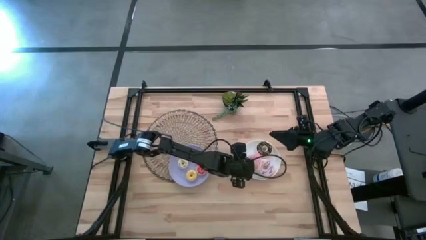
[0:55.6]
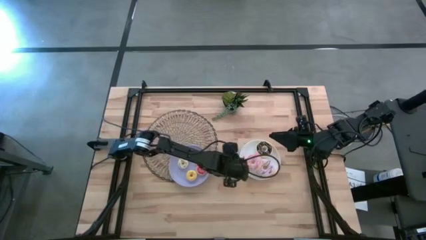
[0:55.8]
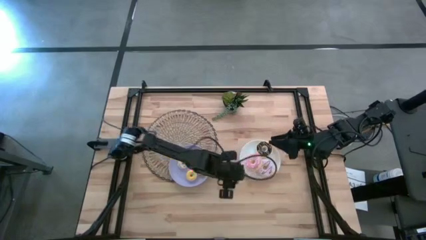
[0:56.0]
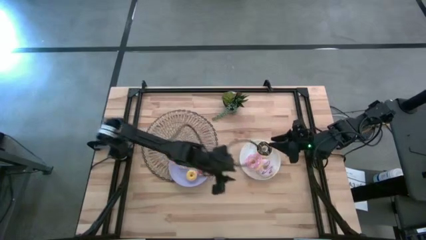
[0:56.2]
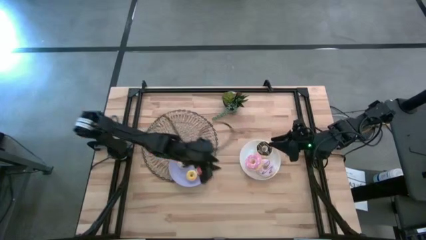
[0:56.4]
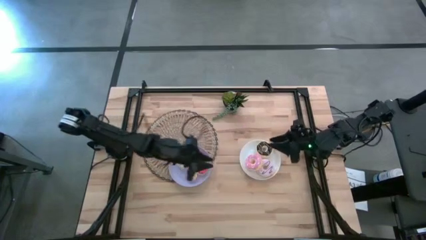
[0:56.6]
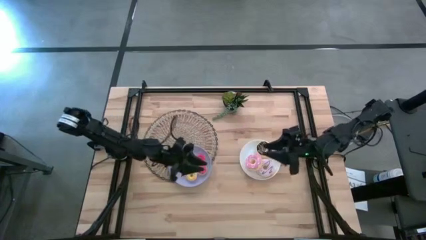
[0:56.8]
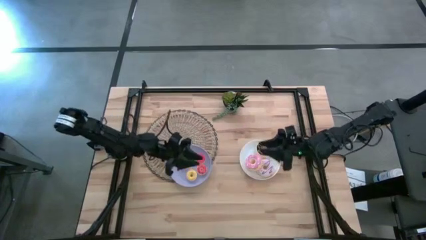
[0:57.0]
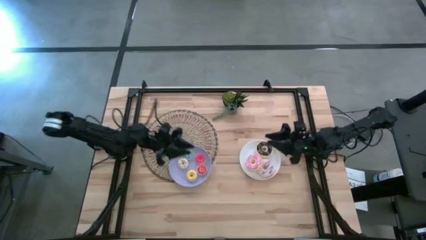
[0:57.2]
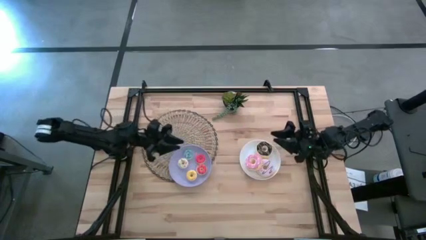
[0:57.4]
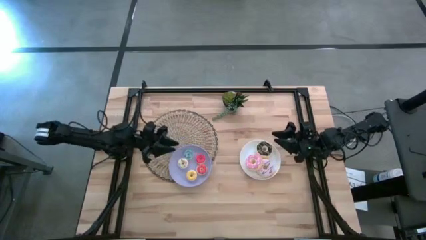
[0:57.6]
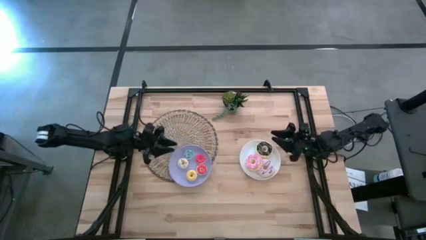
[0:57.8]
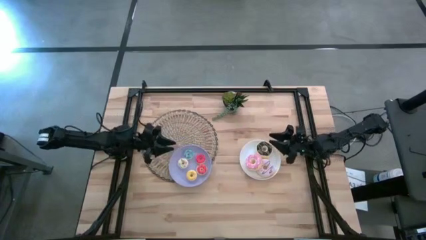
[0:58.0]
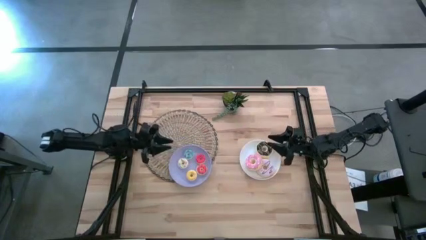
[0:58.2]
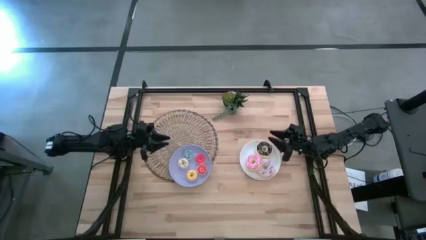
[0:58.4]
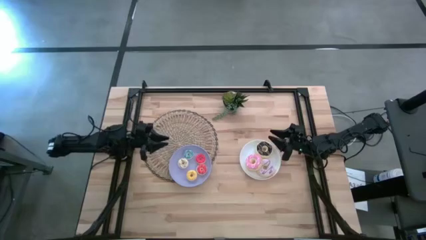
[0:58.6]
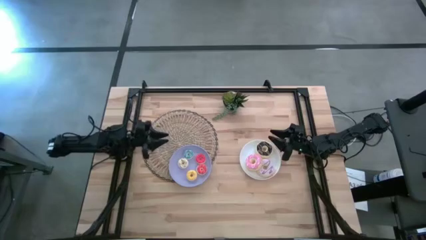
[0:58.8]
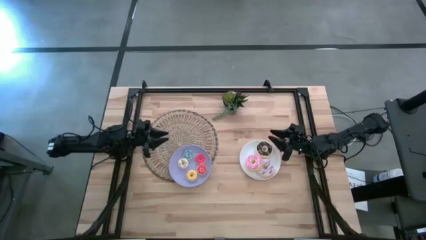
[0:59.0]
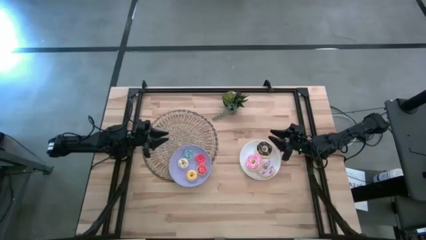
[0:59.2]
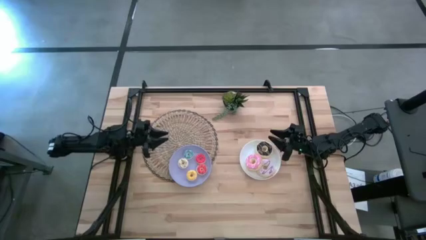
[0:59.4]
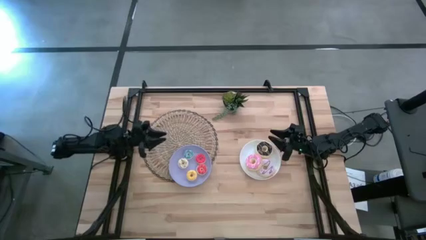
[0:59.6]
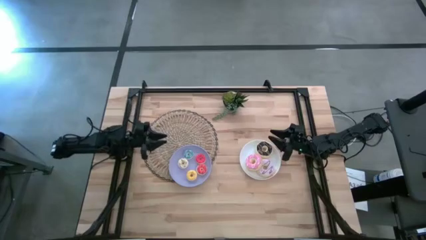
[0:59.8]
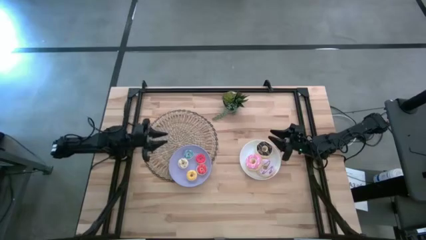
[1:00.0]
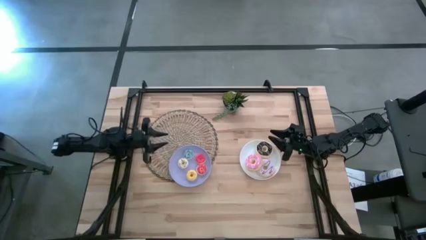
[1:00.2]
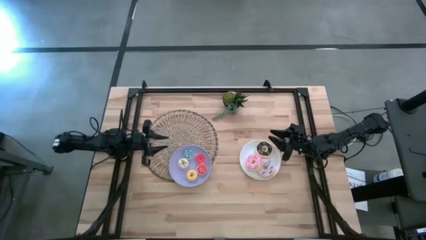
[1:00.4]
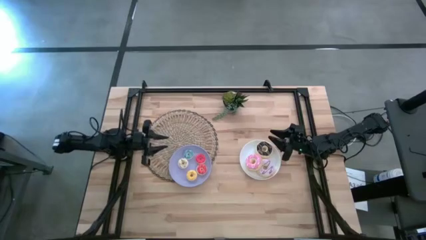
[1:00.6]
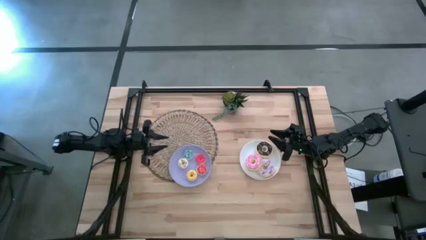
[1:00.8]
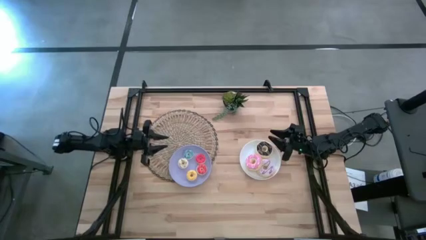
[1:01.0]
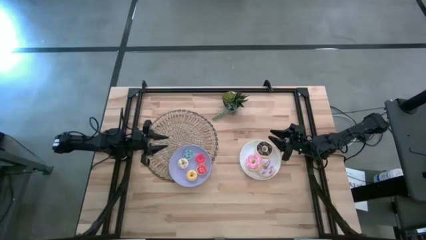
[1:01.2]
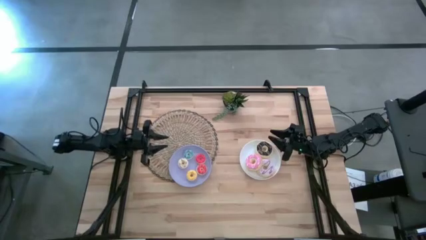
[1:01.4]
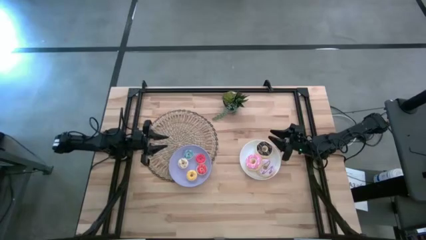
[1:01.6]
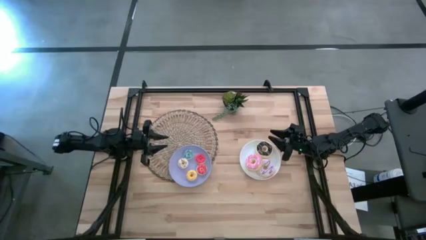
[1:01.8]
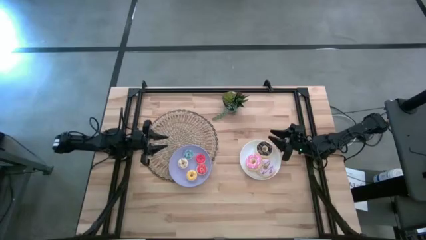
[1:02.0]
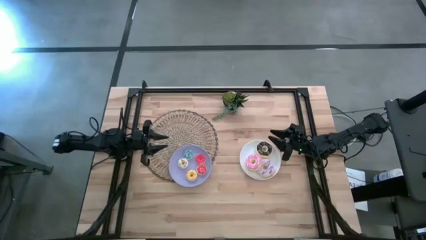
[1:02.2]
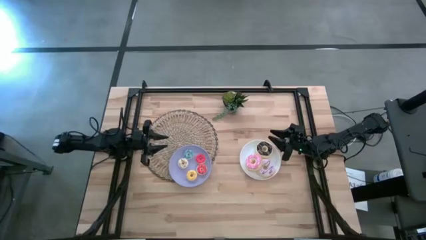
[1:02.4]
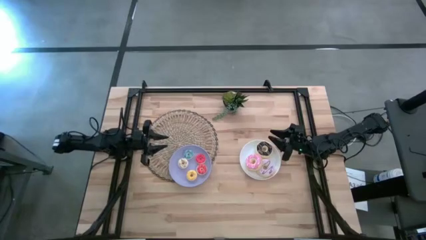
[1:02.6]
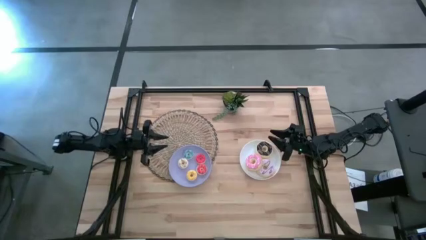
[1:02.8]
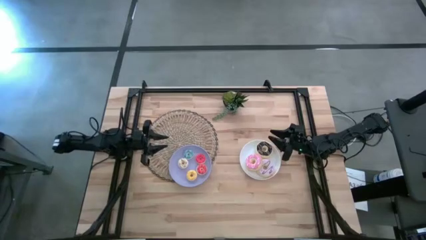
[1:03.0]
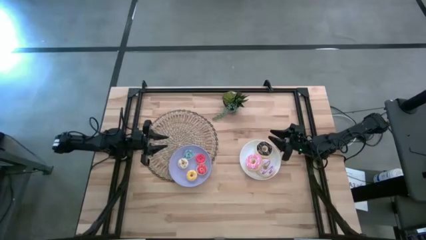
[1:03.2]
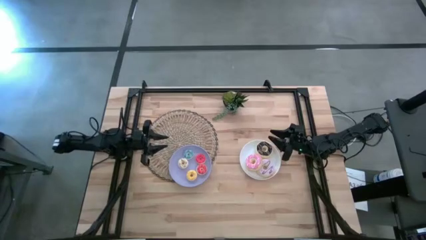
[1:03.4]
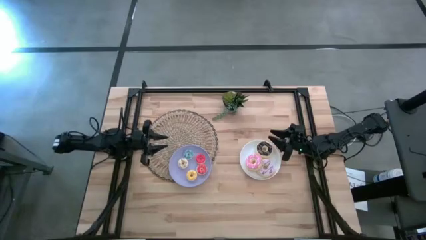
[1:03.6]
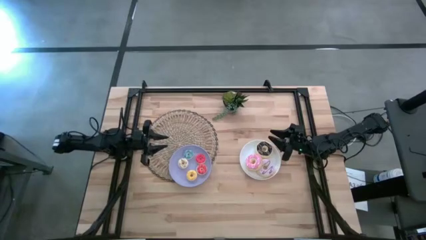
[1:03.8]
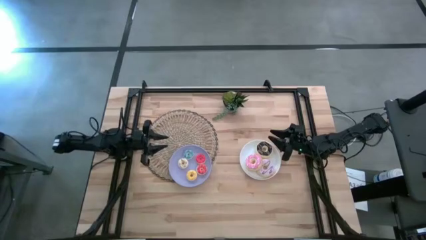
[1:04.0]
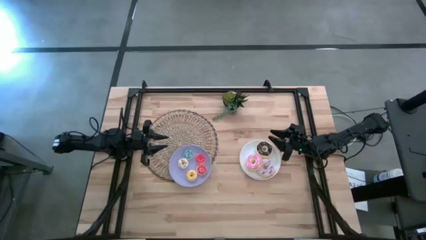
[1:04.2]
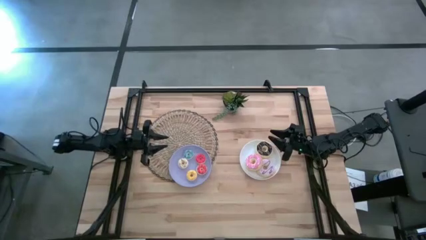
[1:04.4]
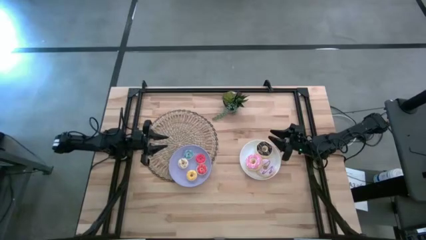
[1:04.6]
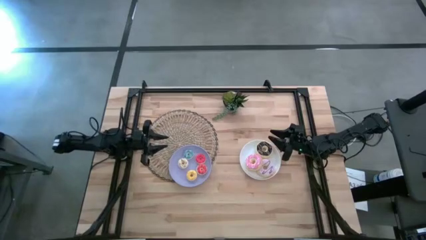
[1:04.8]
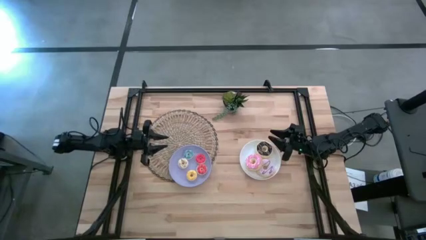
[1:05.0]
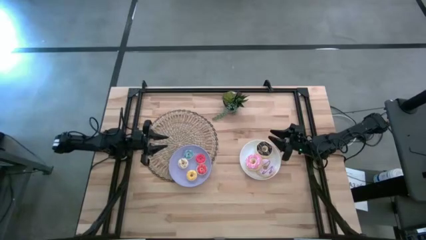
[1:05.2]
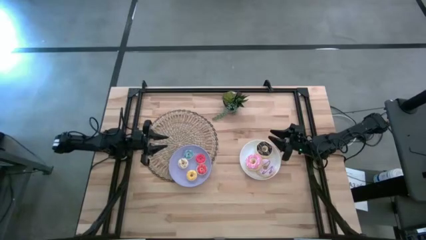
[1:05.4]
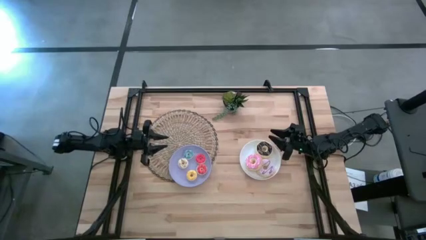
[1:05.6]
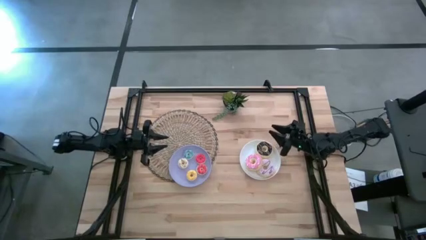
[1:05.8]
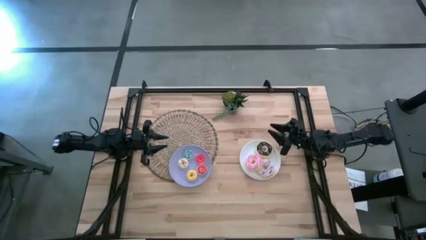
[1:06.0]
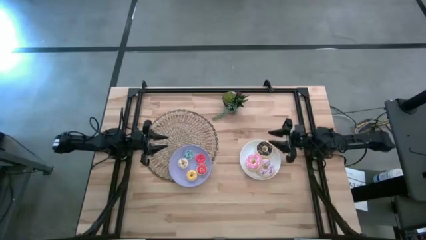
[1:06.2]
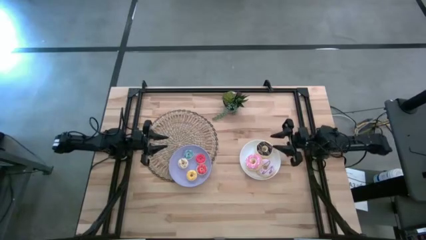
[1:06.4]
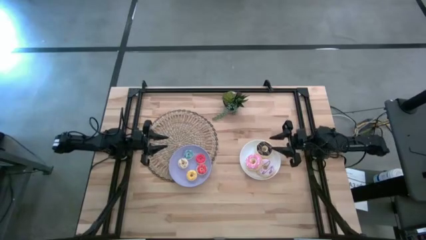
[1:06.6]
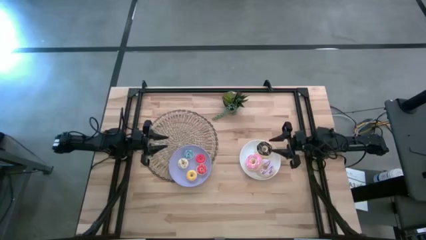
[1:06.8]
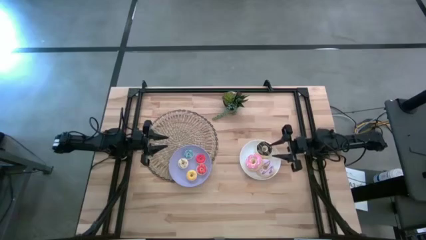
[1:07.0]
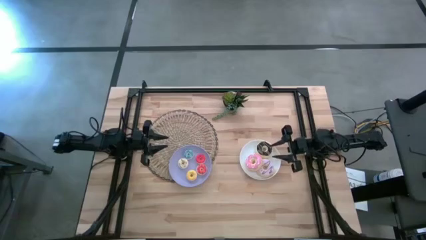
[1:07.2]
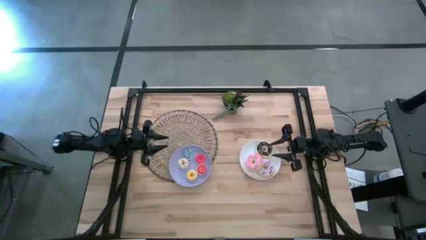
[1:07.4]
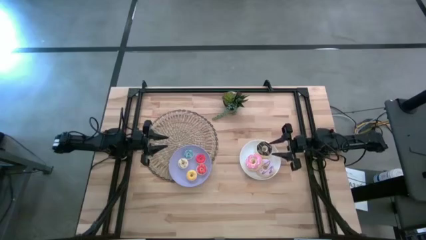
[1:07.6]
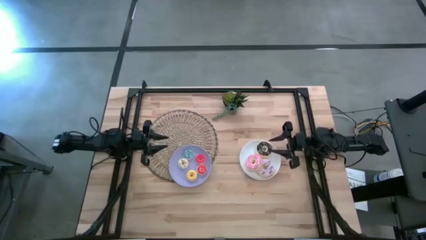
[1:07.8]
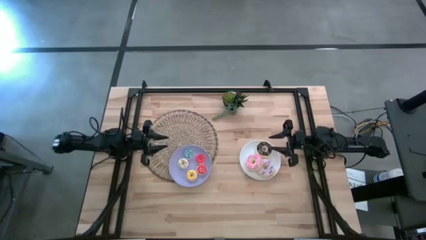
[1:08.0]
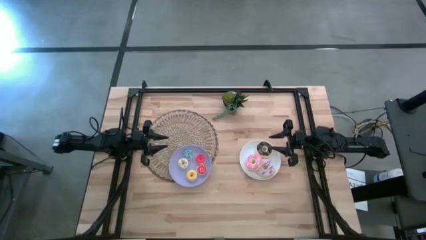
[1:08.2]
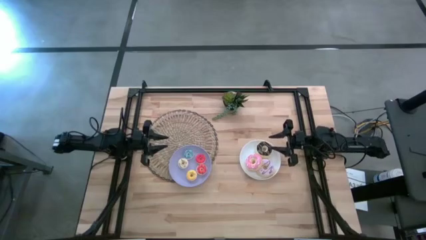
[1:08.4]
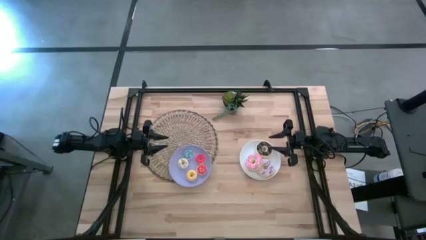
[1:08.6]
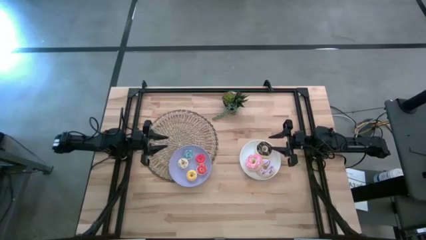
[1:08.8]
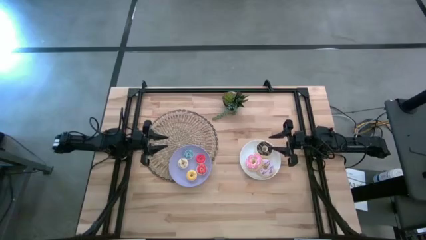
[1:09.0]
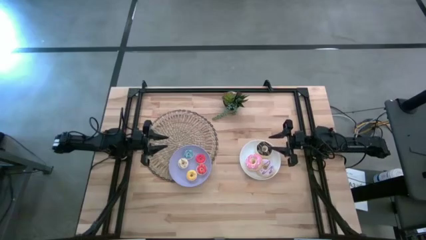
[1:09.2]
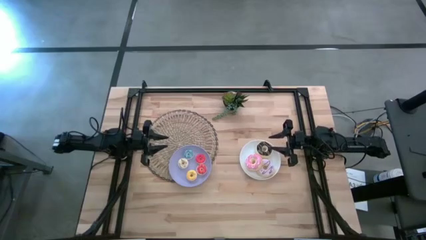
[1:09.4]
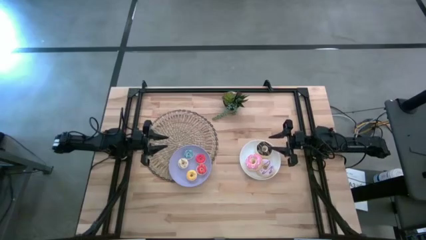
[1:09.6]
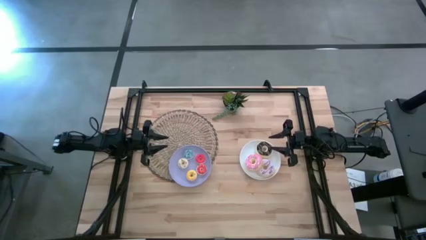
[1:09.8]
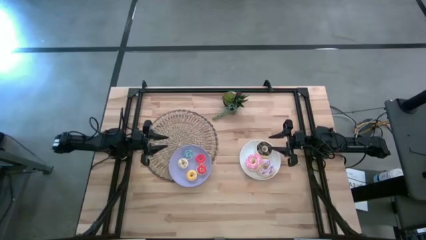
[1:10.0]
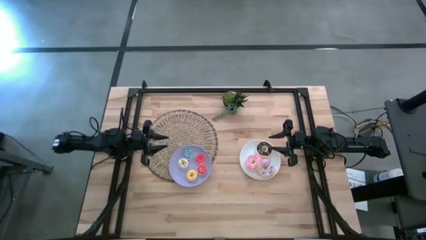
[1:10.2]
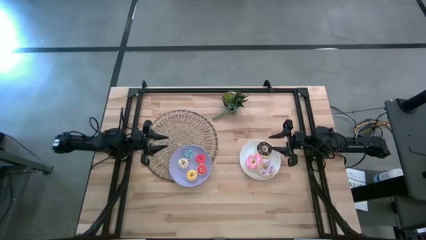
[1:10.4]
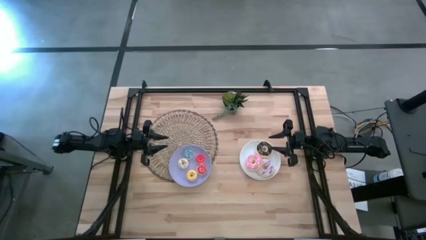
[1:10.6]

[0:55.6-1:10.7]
Task: Pick & Place donuts
Return to Home Position

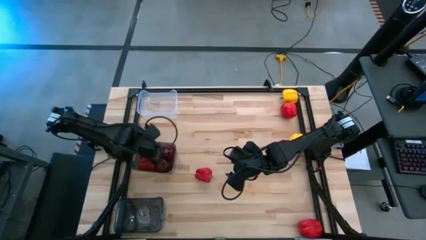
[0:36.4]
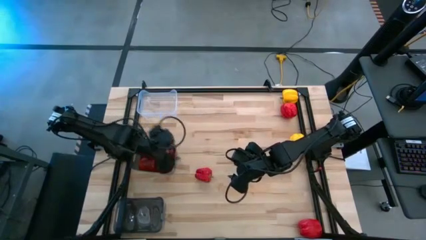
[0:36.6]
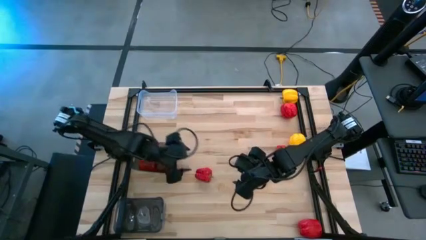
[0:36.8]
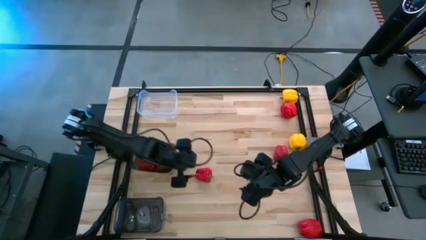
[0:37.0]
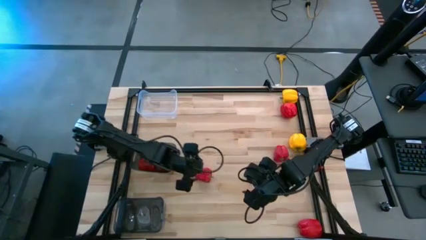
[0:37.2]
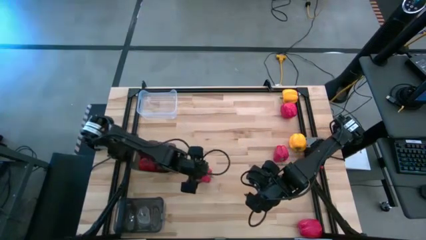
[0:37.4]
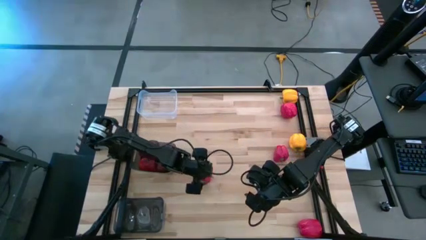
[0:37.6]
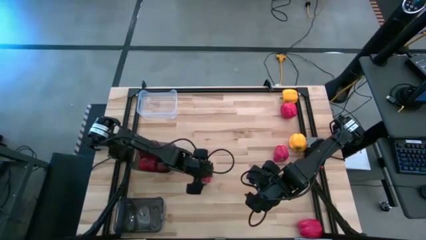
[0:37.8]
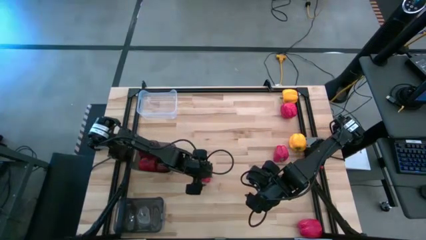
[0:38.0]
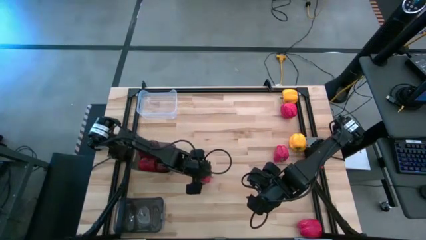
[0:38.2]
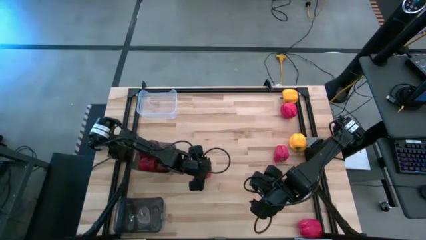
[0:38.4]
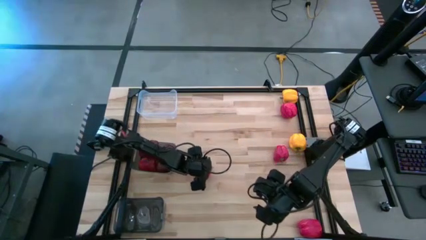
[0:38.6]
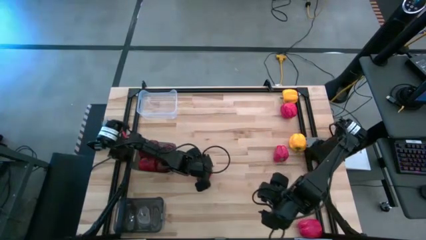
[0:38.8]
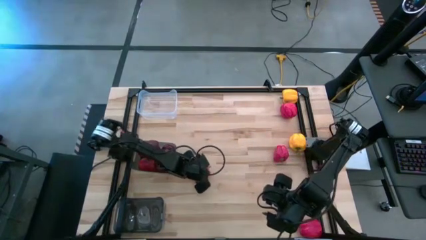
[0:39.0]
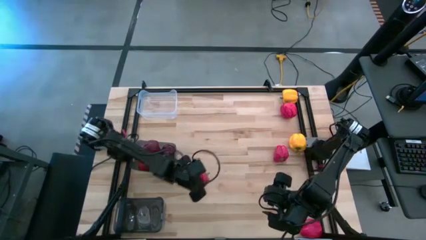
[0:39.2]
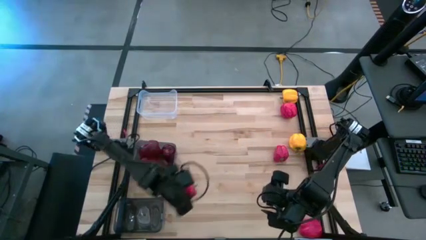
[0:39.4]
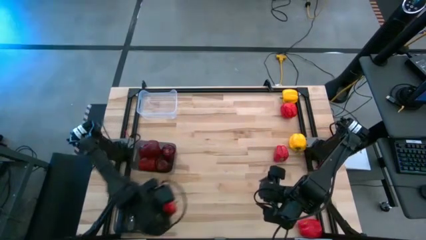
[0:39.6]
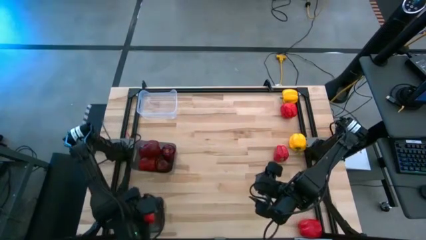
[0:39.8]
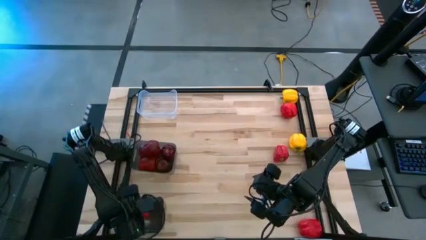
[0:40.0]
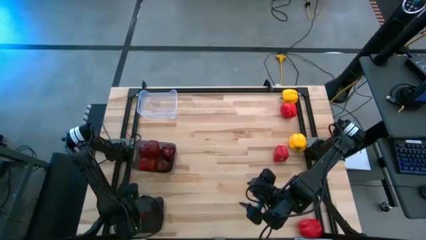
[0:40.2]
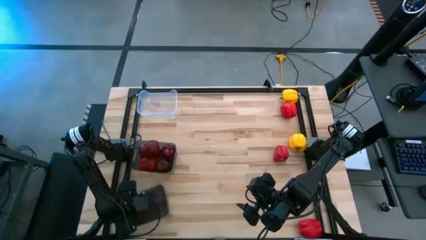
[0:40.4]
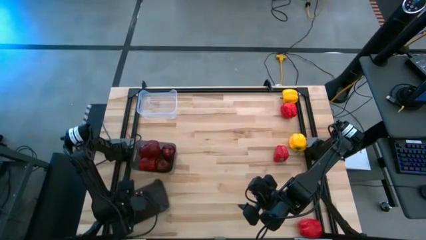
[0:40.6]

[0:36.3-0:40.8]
Task: Sort produce into baskets
Put the red bell pepper into the bottom black bin
